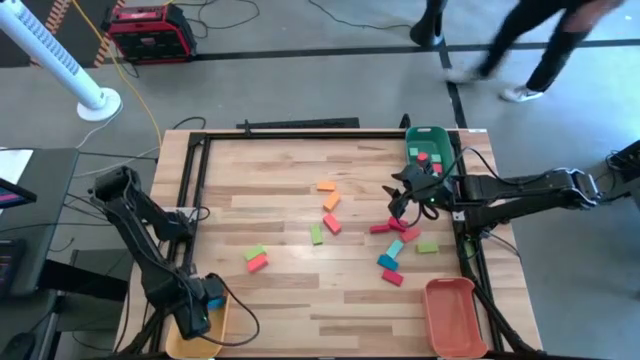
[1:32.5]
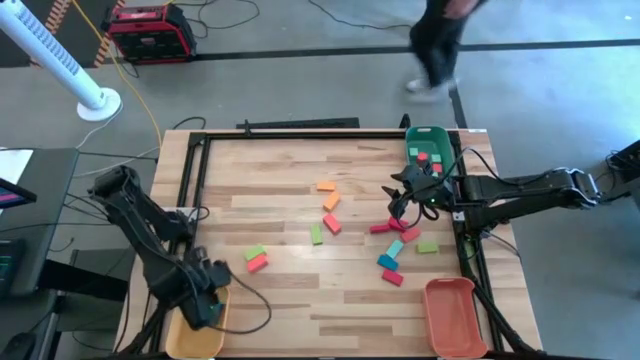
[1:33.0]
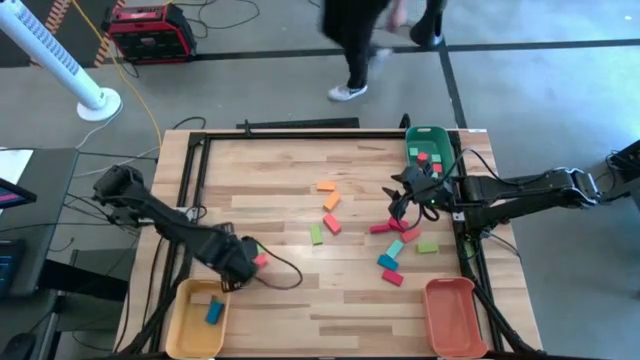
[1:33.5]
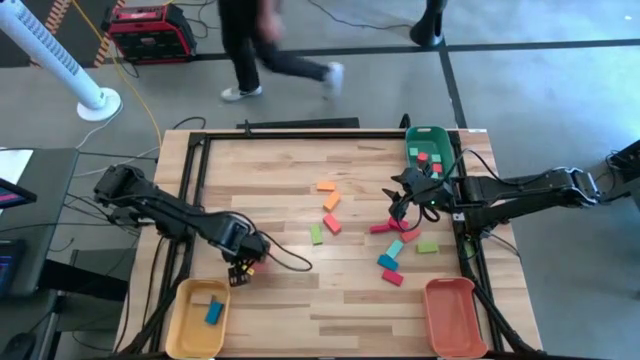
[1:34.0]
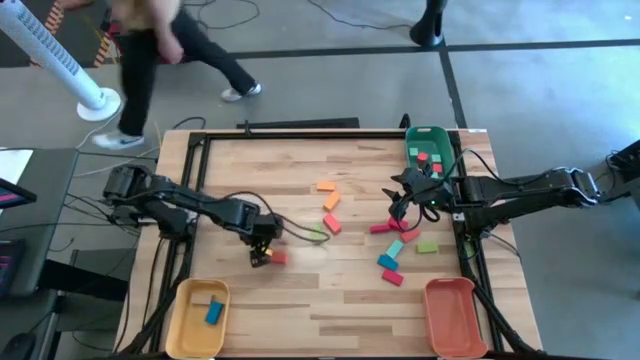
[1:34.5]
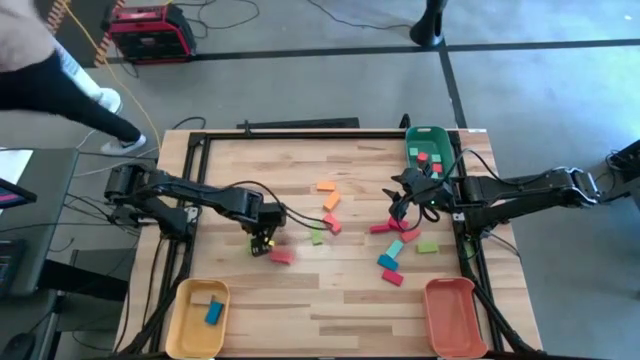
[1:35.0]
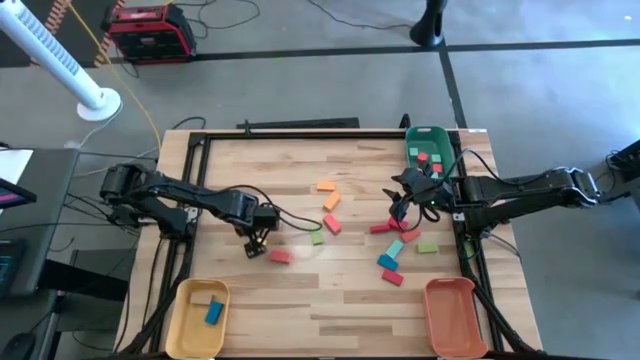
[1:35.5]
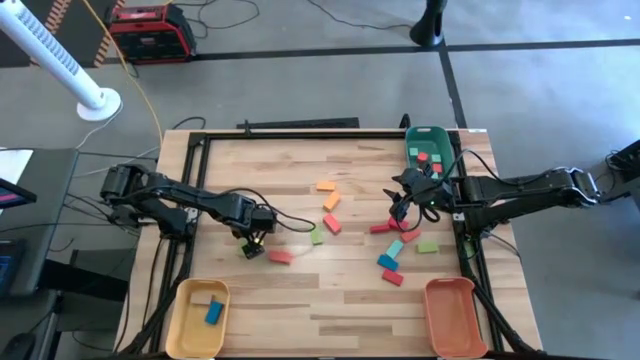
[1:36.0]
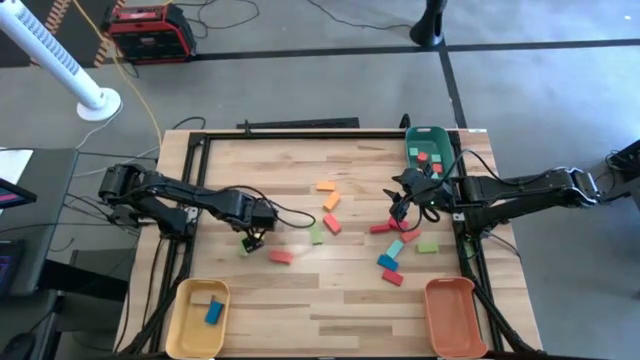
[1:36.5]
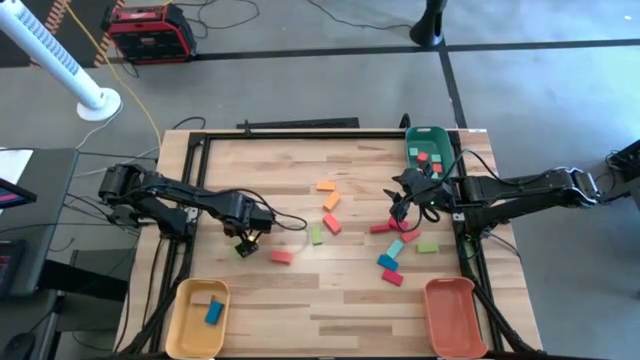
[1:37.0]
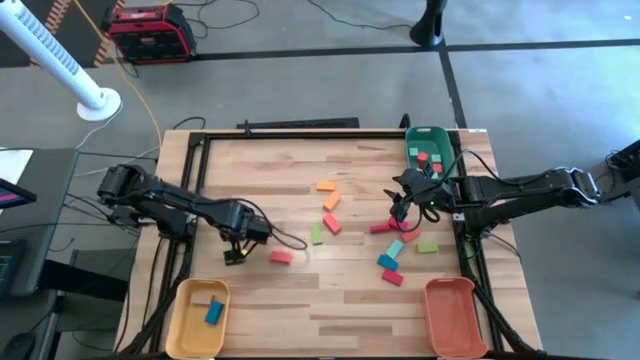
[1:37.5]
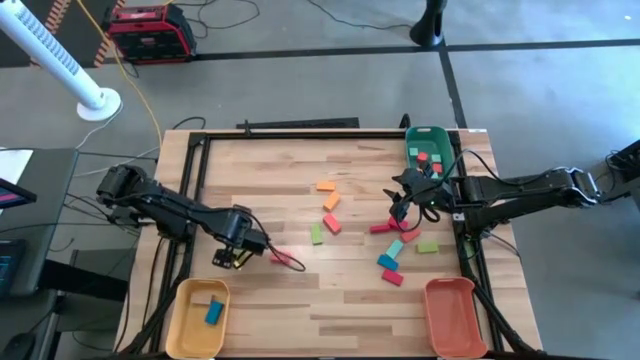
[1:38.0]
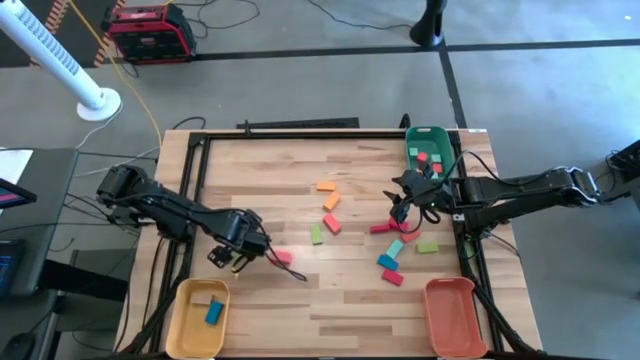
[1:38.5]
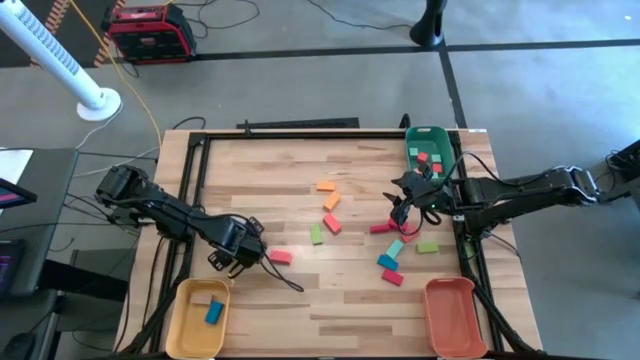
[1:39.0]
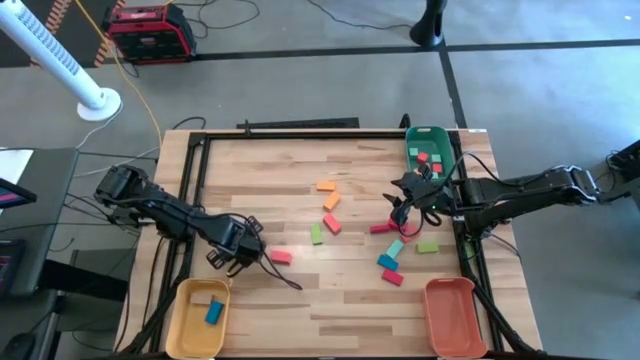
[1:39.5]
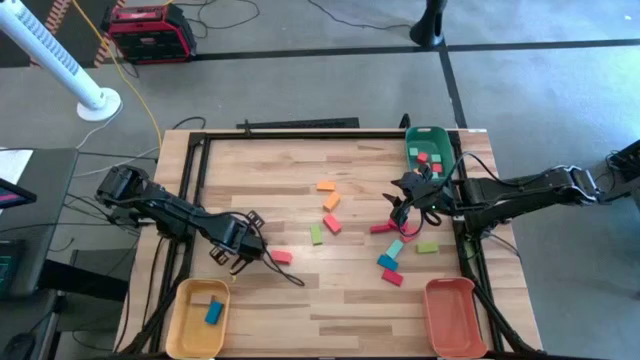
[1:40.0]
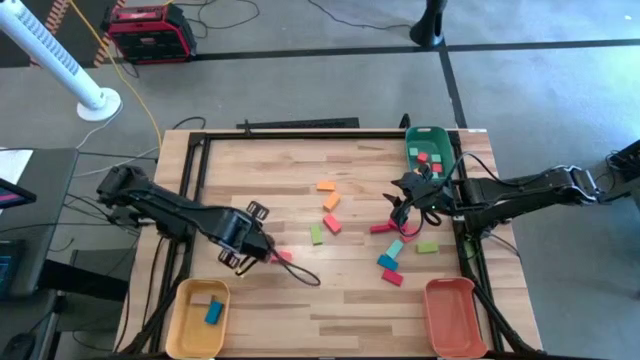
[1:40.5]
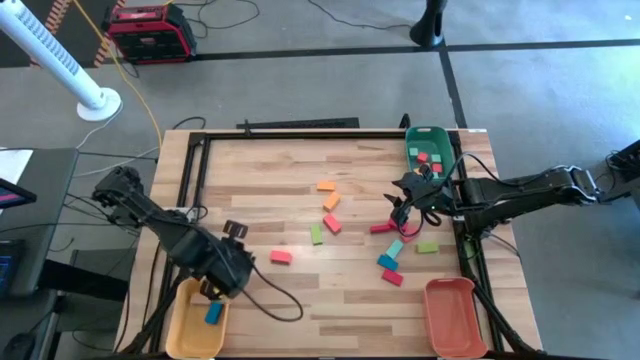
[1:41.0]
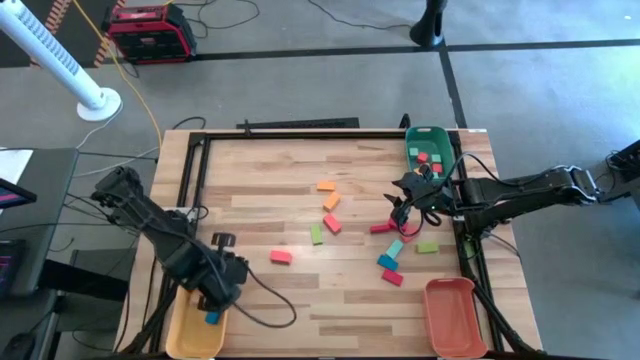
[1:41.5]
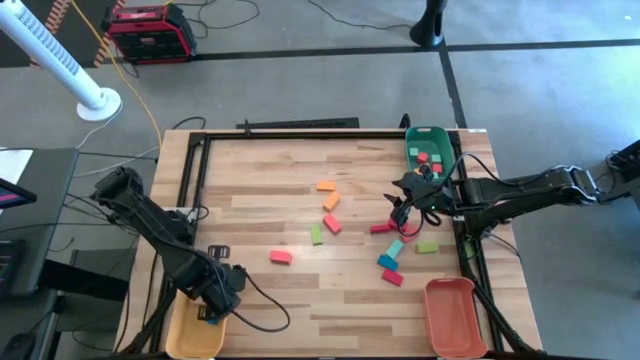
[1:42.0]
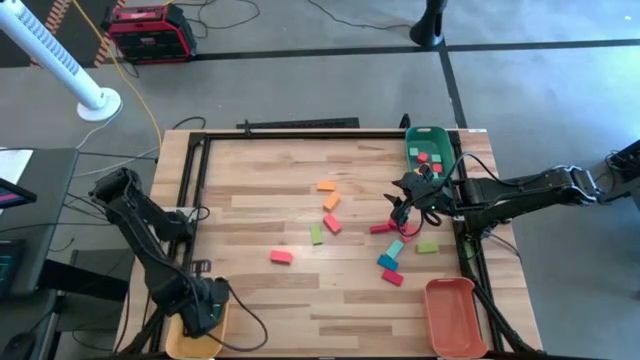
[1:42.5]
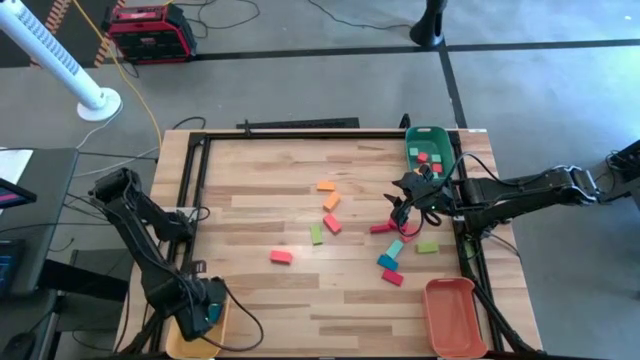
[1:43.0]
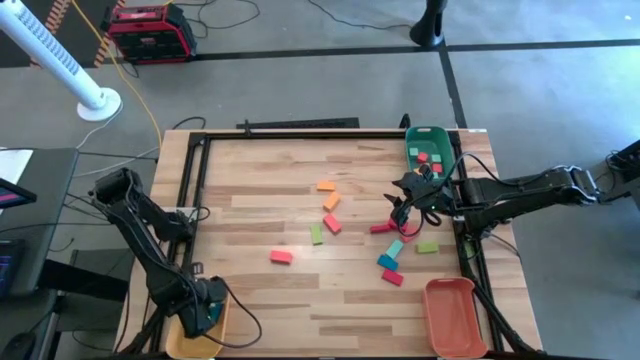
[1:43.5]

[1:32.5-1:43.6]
Task: Sort blocks by size
Put the light green thick rectangle block into the yellow bin

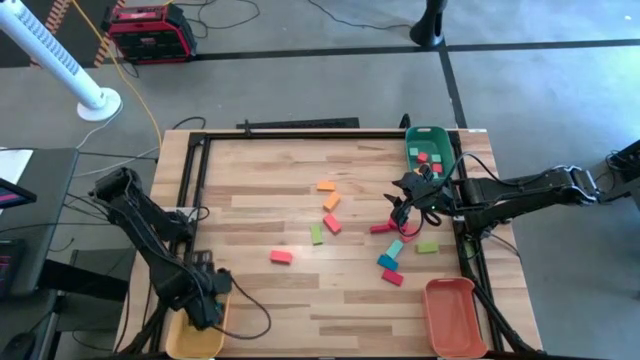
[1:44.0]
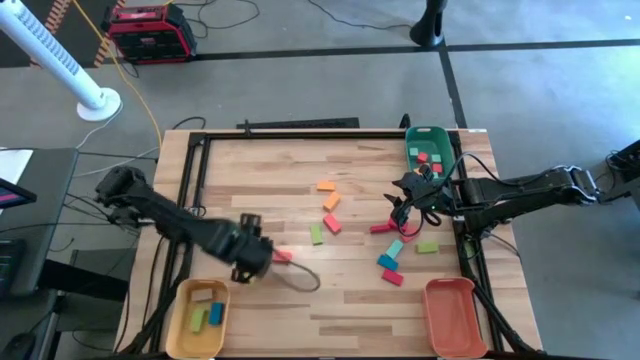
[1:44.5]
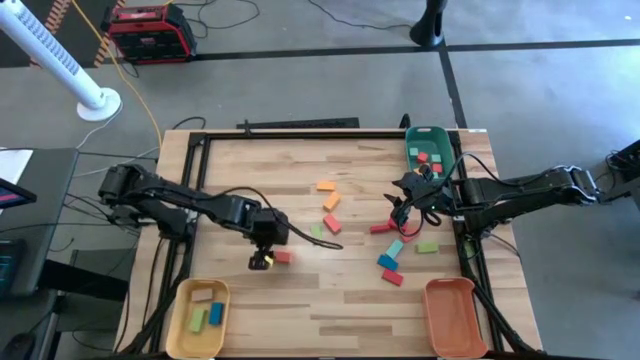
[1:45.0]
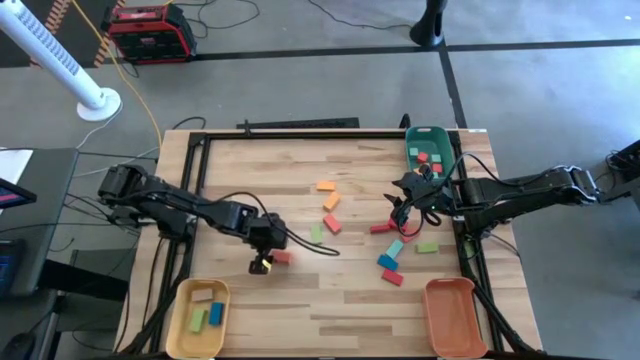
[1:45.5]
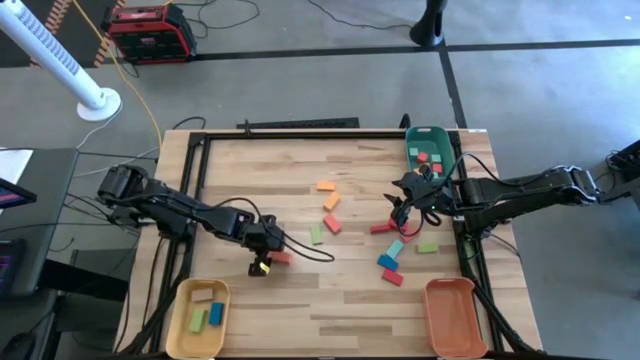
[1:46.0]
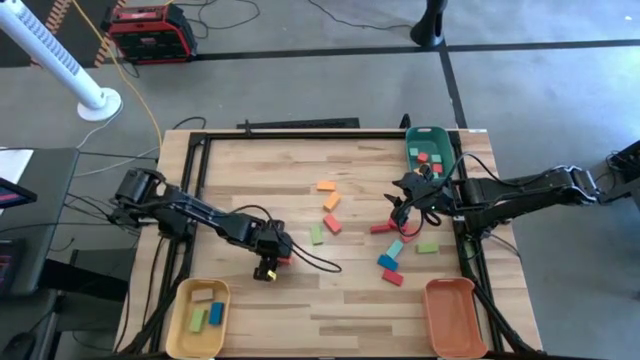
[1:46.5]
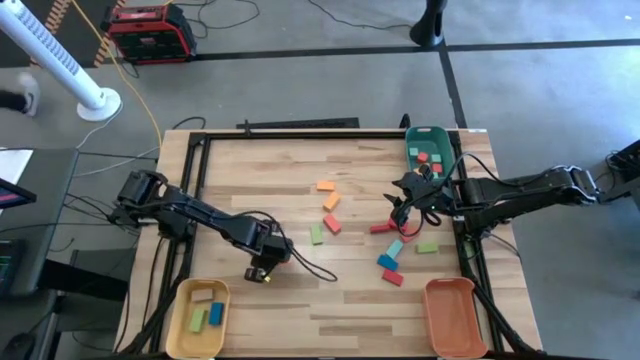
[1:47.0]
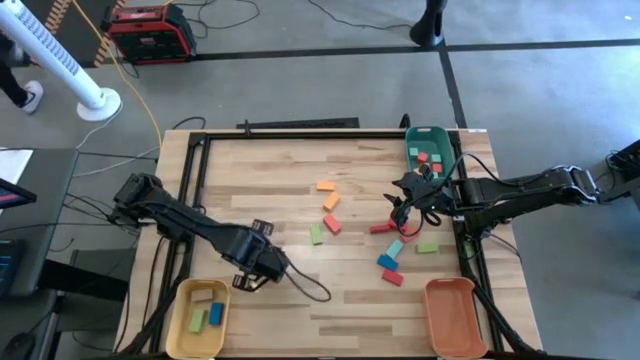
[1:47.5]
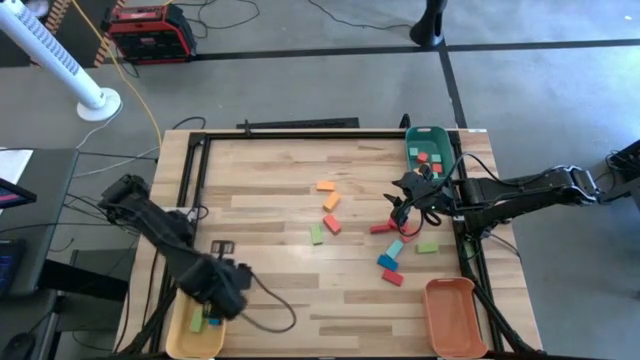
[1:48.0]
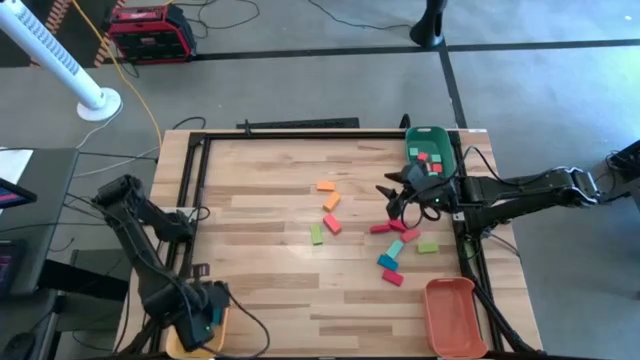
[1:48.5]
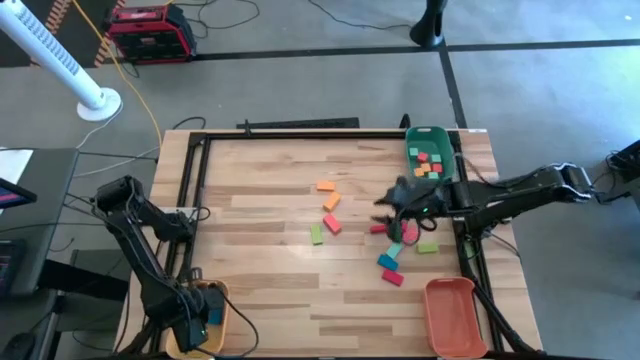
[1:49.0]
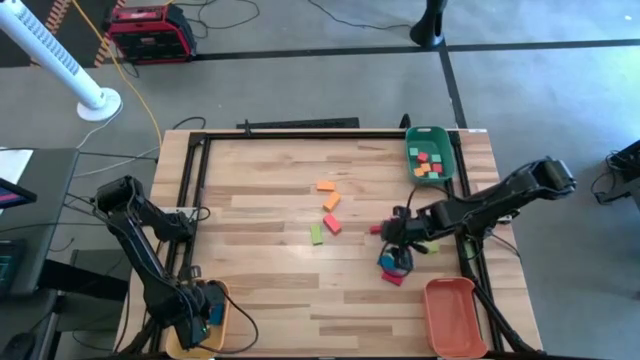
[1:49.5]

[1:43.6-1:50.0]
Put the orange thick rectangle block into the yellow bin

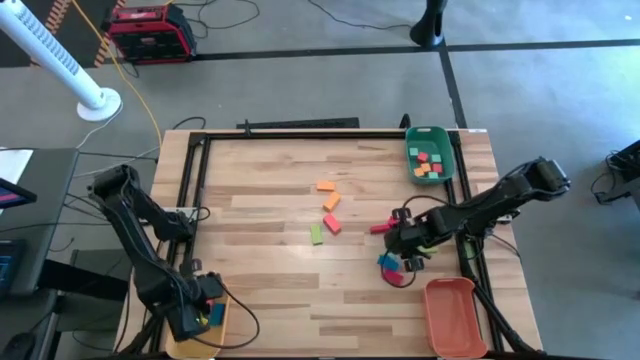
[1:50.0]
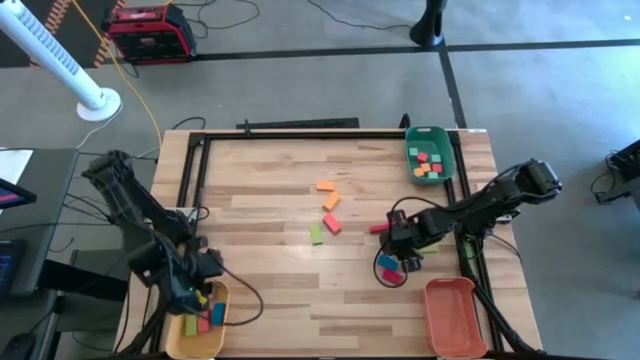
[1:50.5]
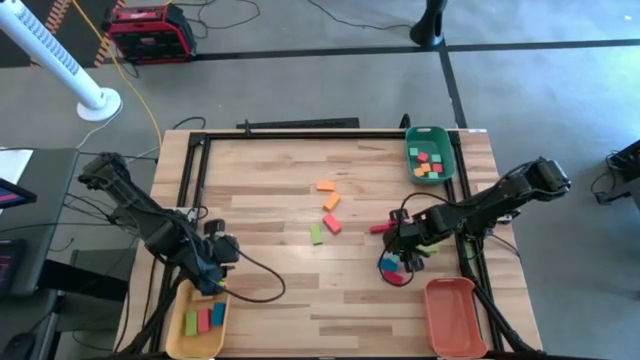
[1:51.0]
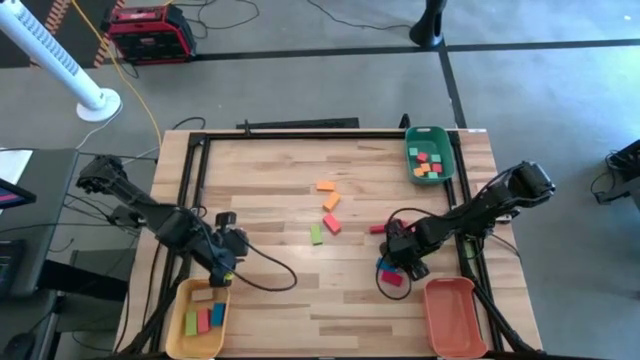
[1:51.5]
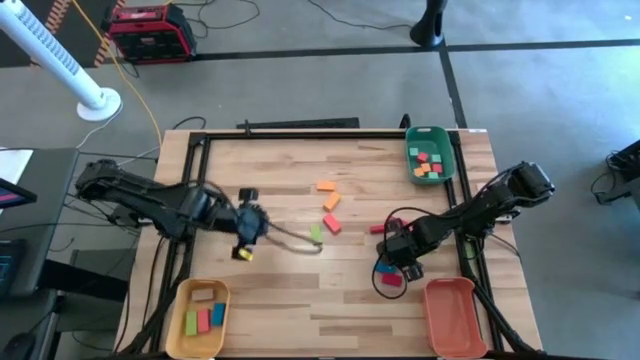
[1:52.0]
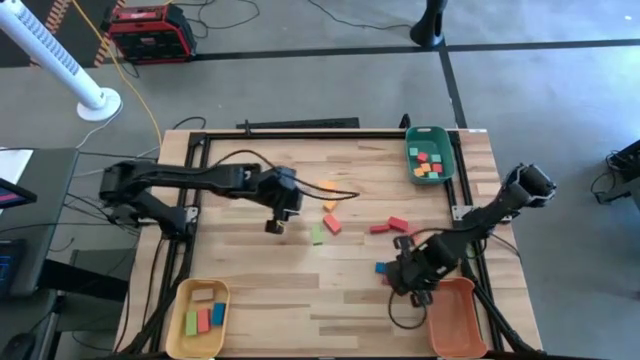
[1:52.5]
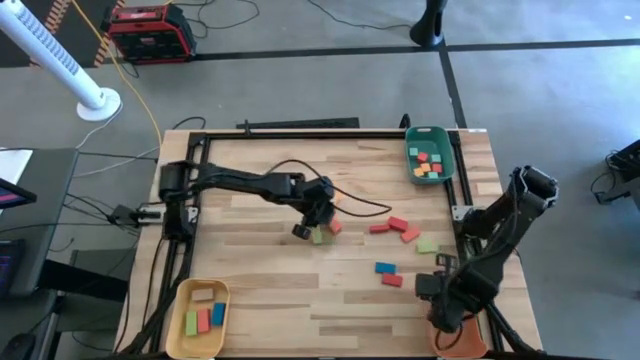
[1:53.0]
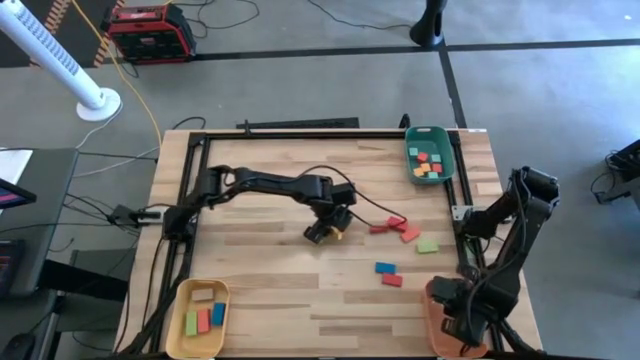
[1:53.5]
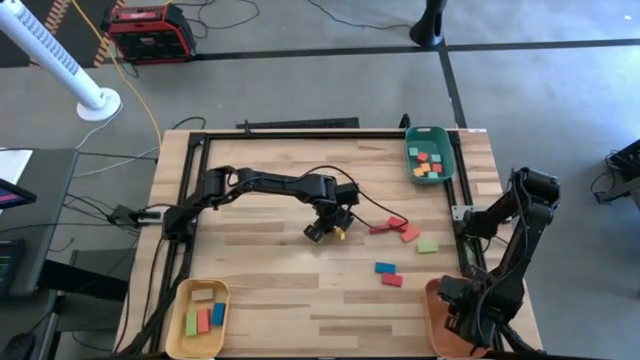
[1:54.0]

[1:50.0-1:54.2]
Put the light blue thin rectangle block into the orange bin
